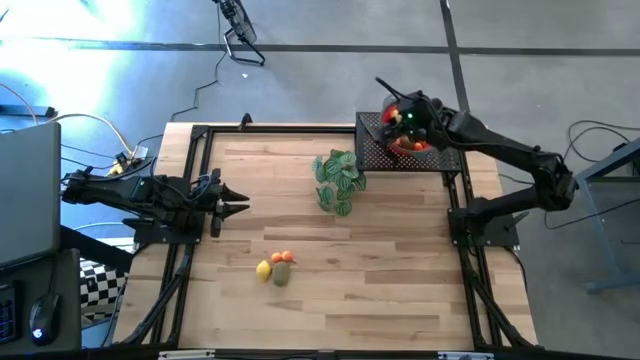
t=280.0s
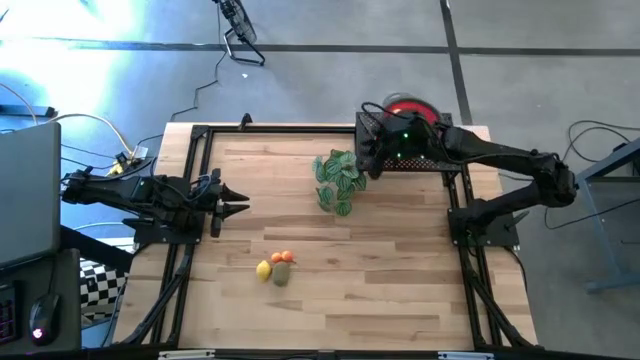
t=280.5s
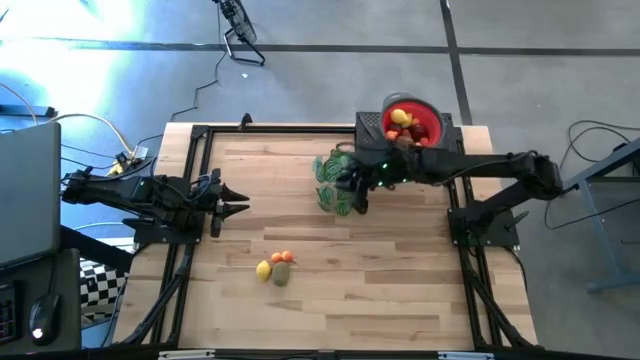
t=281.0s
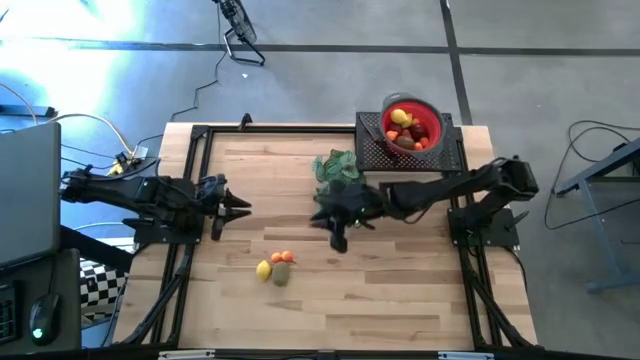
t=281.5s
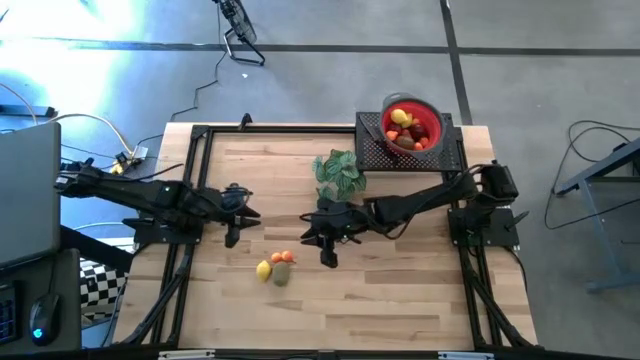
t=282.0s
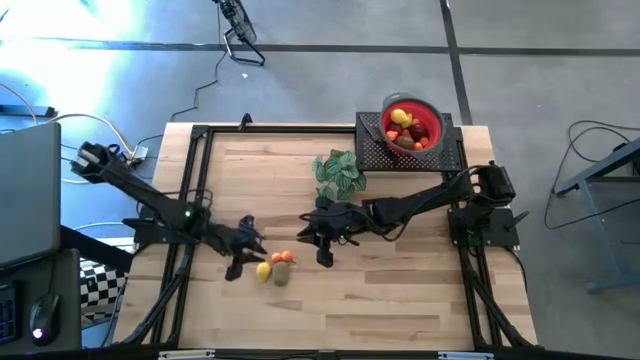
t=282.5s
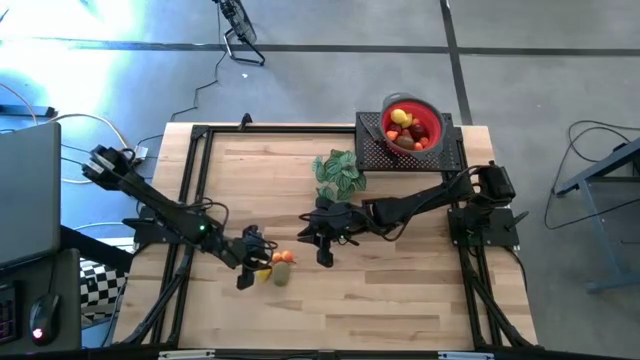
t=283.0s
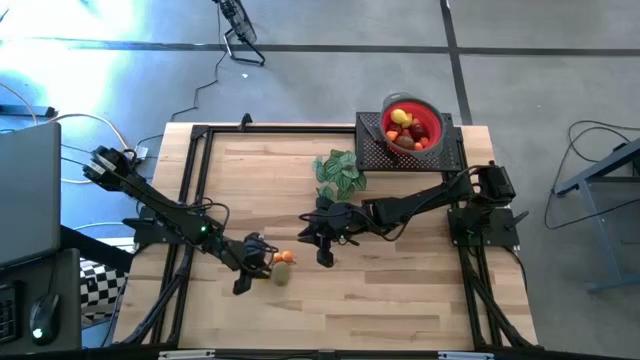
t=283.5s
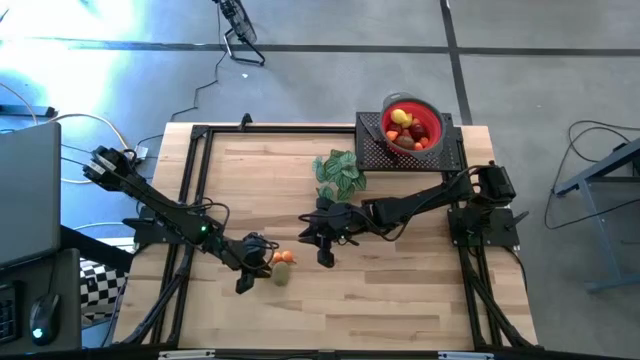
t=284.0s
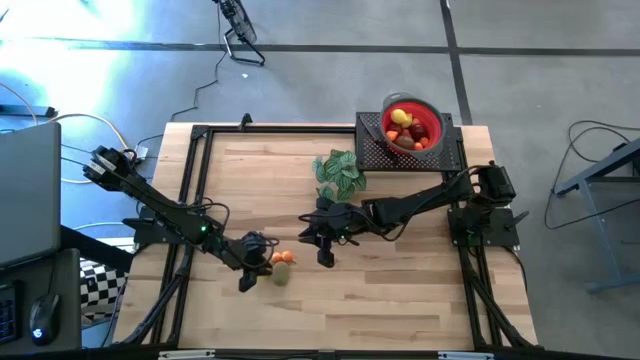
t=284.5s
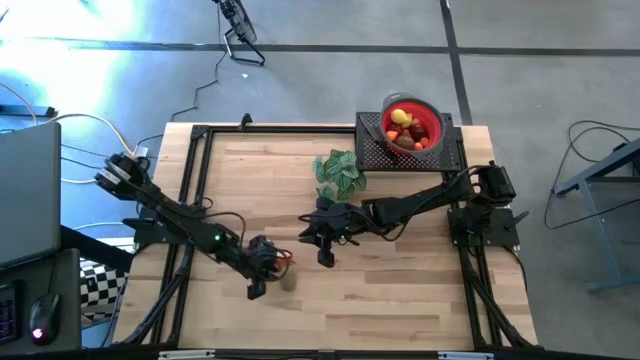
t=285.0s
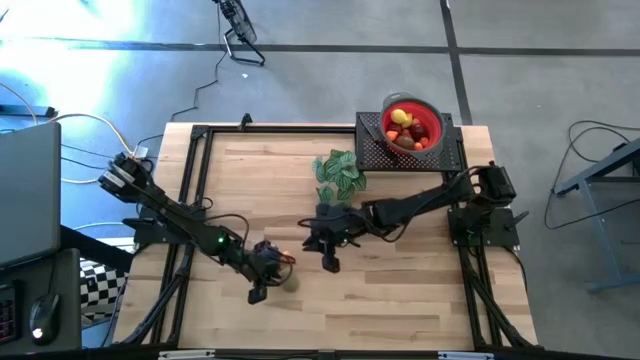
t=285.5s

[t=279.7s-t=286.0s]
Task: Pick & Place Fruit
Put the kiwi into the red colander

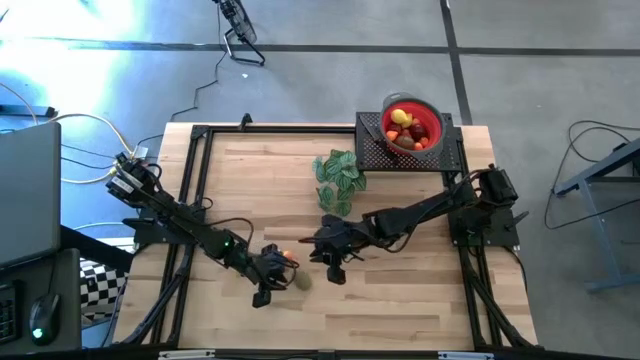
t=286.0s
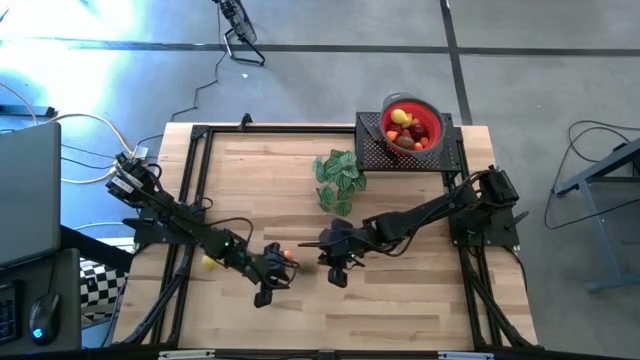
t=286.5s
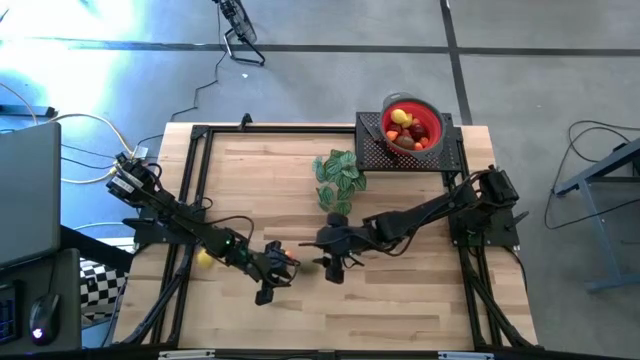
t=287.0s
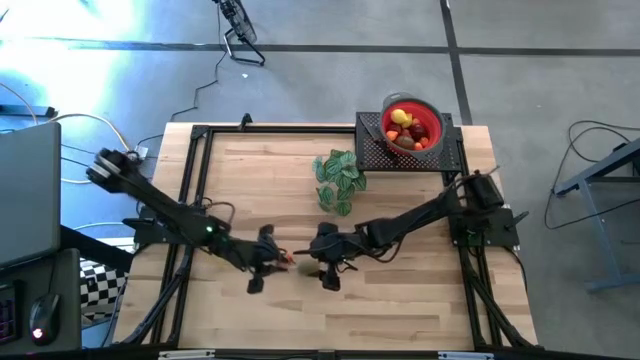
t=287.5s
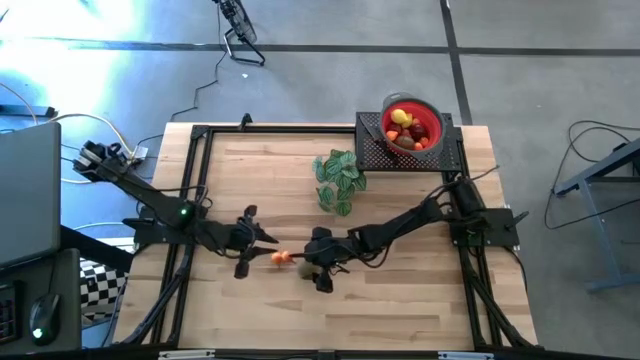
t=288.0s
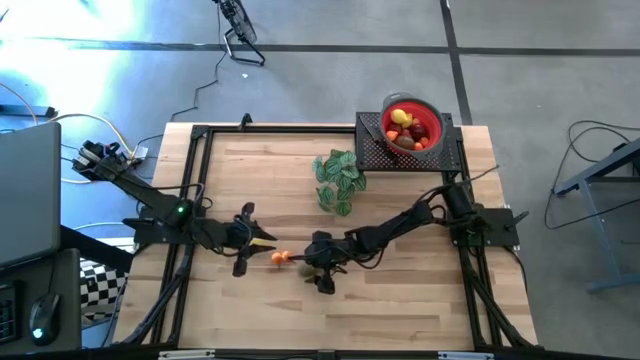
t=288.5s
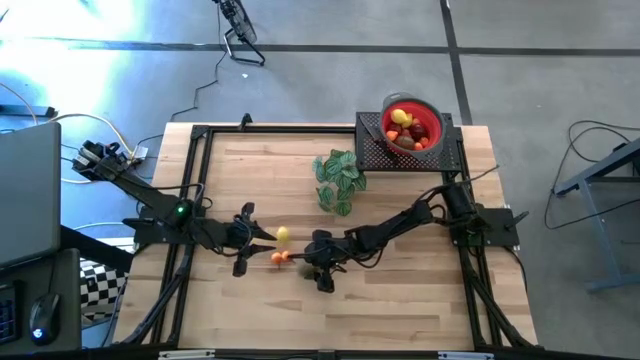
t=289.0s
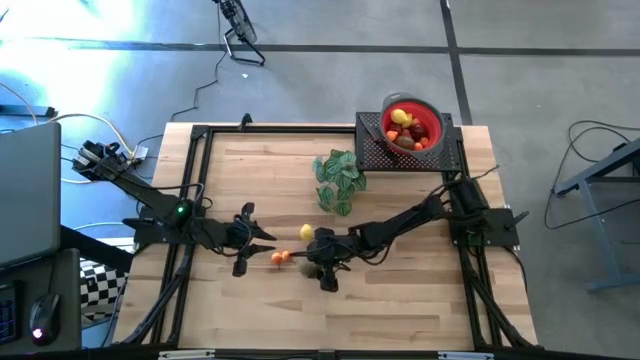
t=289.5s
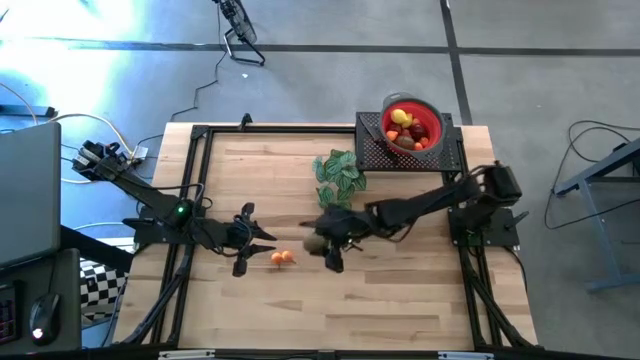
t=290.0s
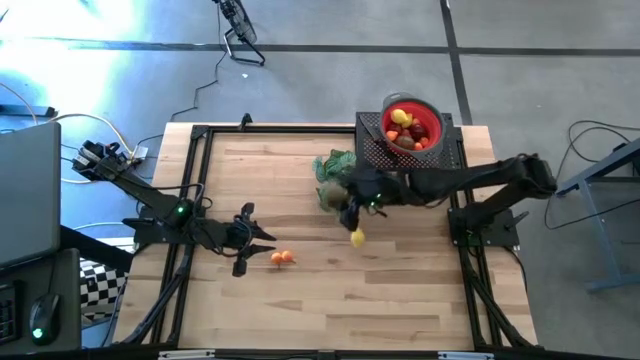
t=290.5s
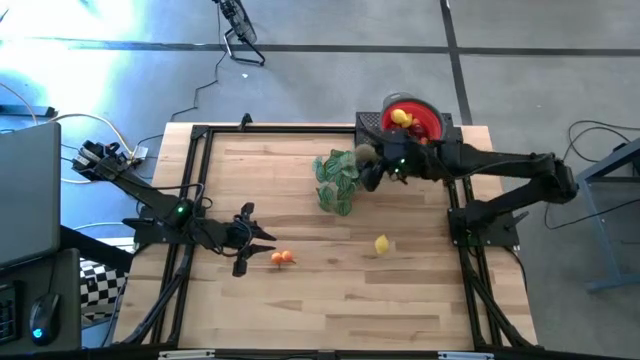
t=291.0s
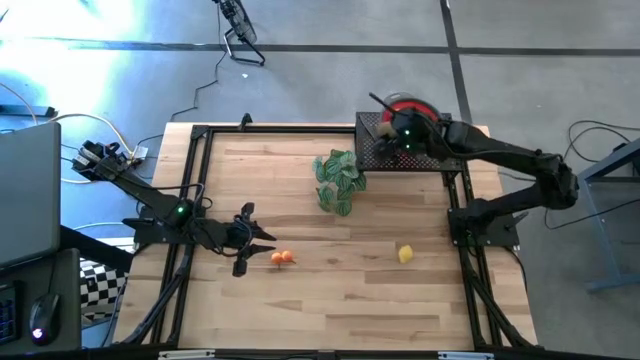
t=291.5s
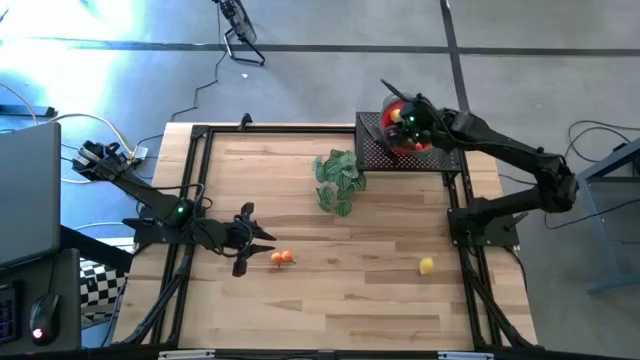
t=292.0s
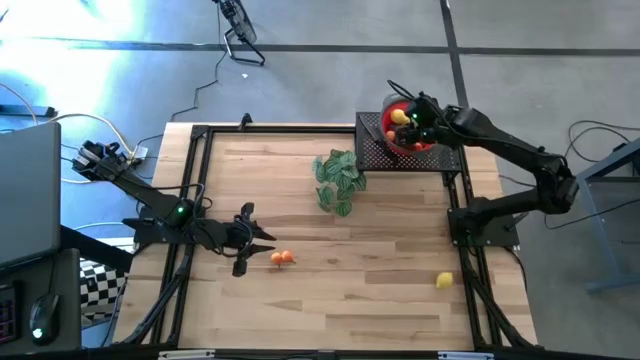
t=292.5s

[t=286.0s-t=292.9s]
Put the kiwi into the red colander

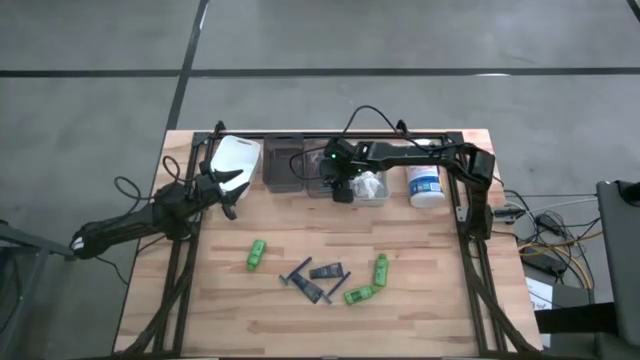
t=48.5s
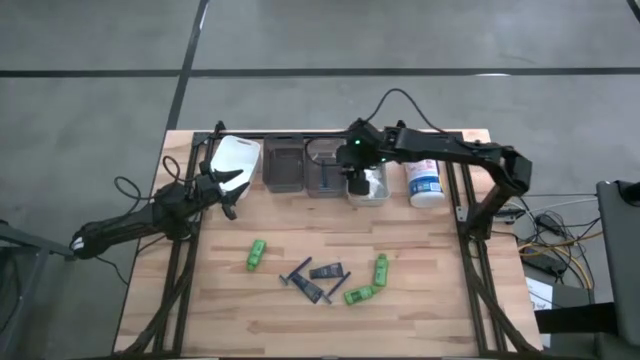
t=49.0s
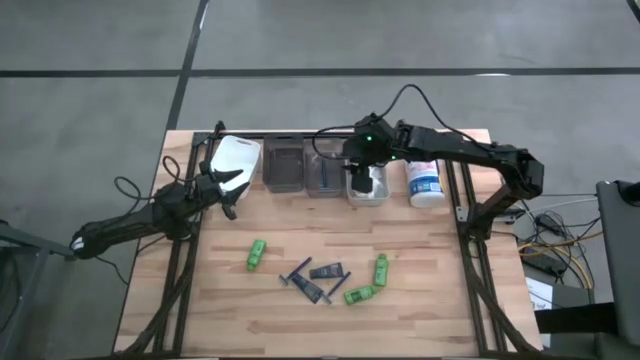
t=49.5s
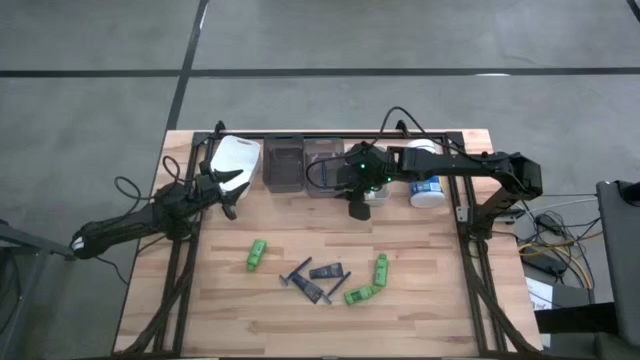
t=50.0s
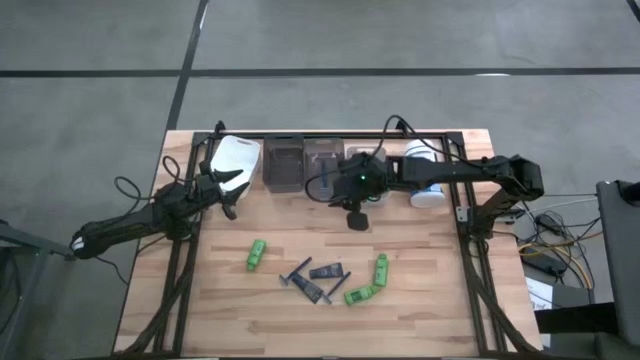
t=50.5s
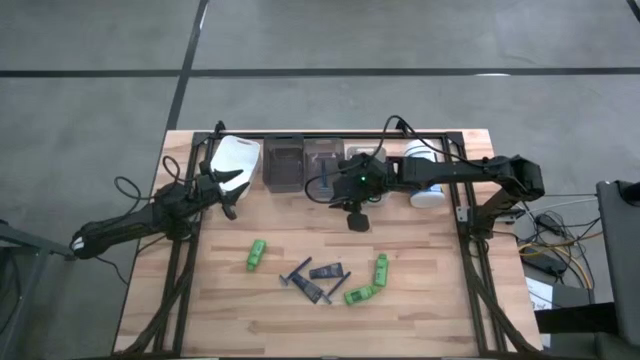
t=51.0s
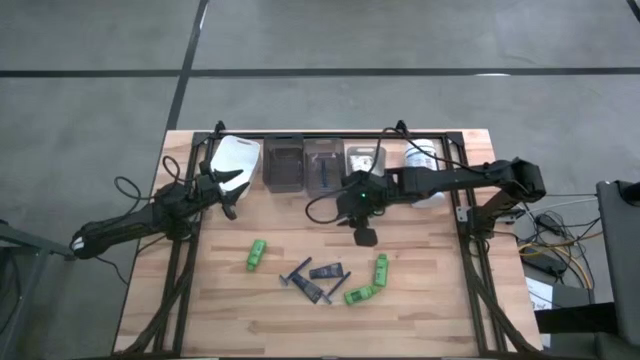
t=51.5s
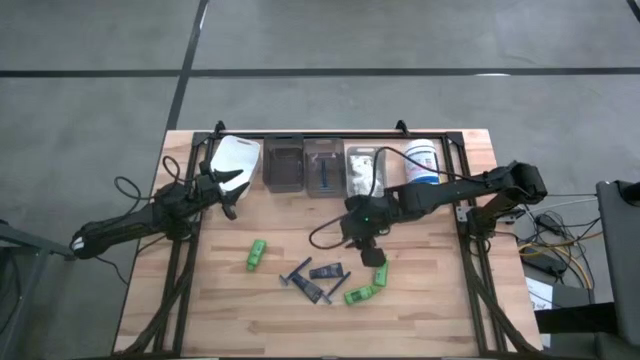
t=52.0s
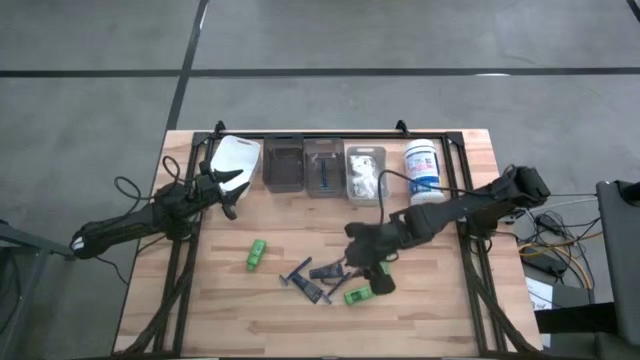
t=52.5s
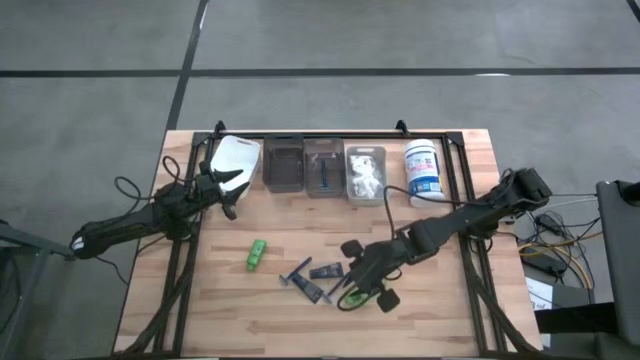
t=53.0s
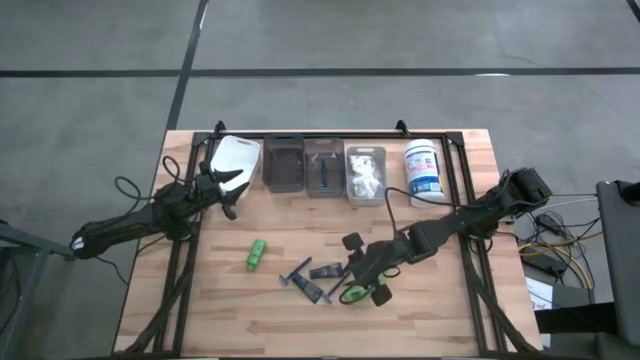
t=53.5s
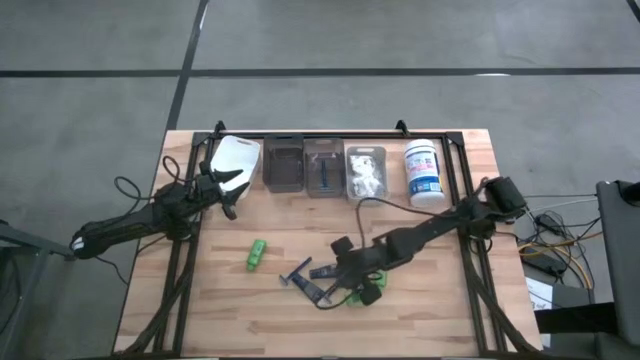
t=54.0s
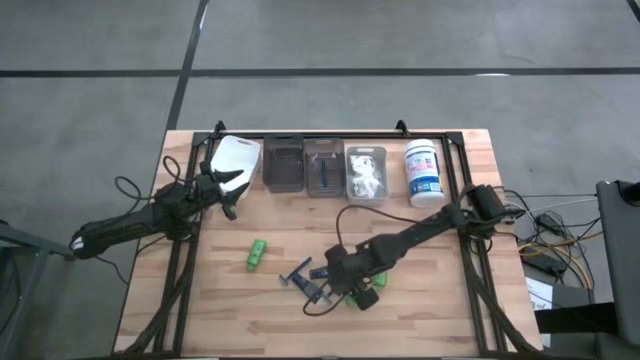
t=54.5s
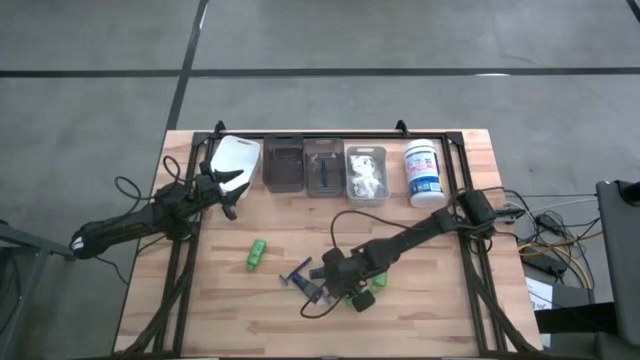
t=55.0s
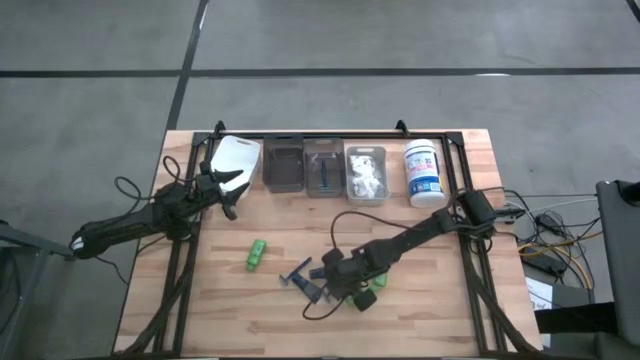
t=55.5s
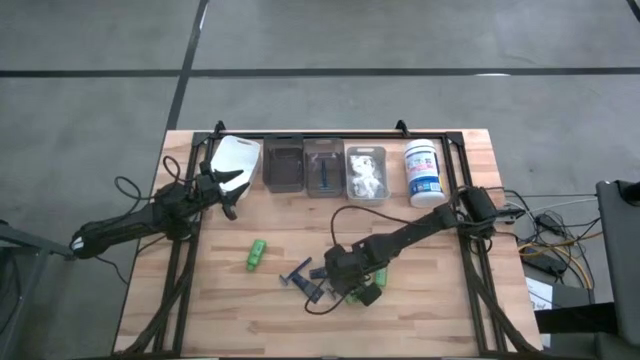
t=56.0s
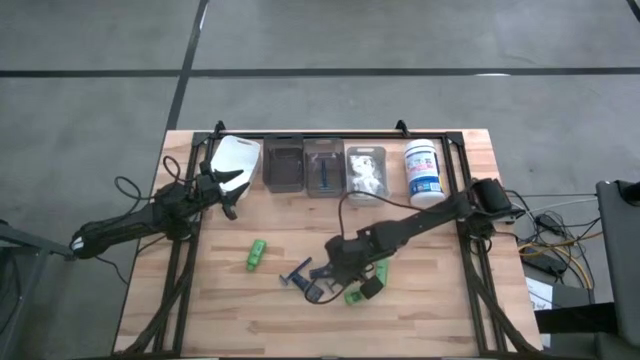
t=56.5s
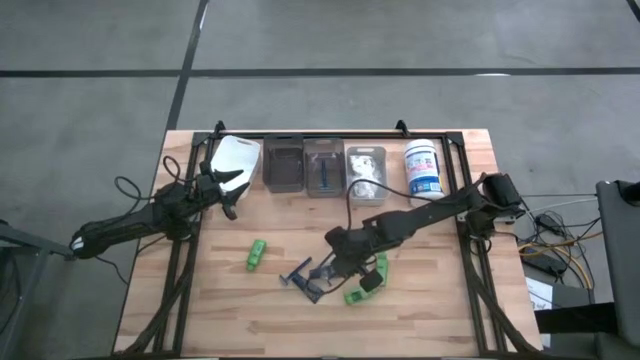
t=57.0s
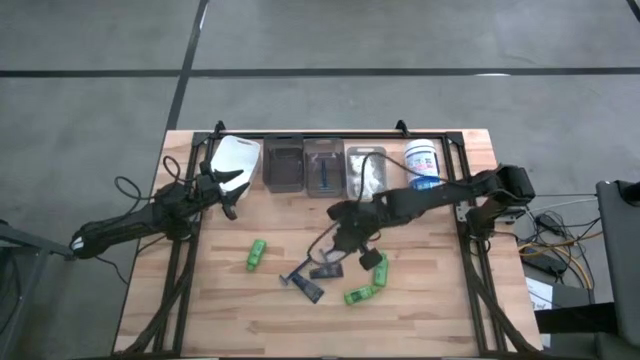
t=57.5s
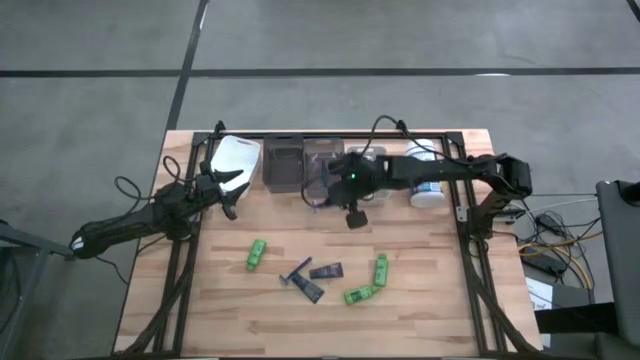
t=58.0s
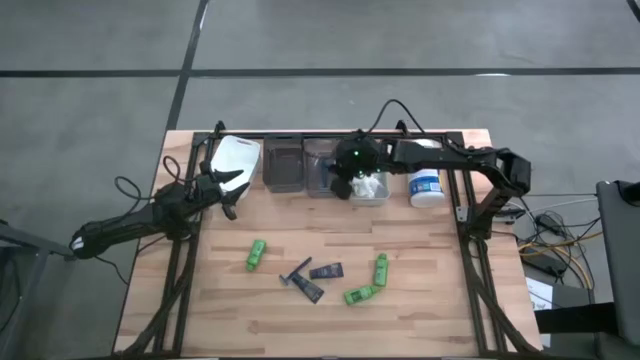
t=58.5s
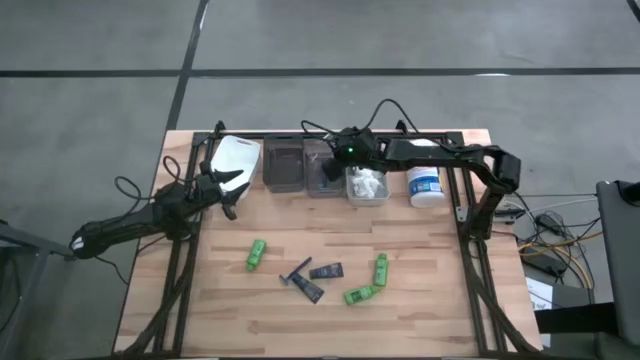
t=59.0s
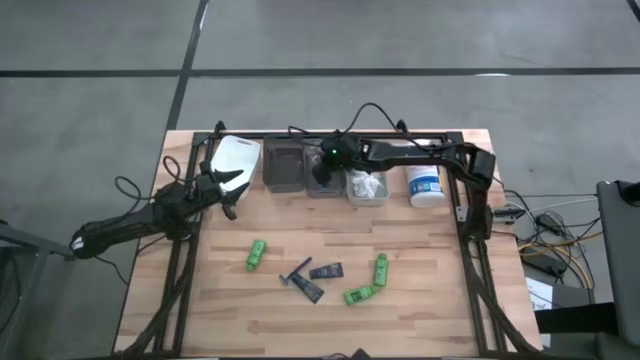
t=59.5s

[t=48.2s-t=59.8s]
Task: Pick & Place Travel size toiletries
Put the right razor into the right black bin
